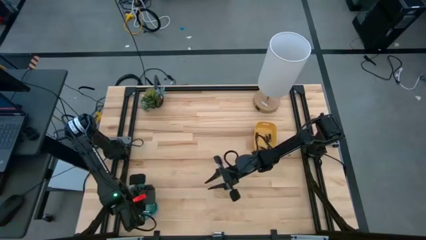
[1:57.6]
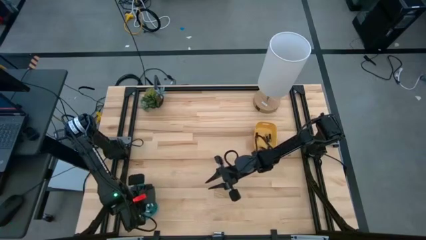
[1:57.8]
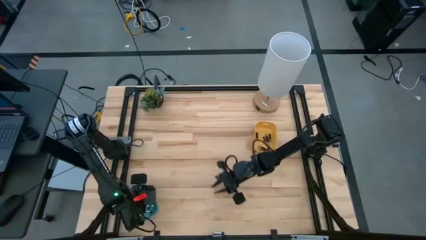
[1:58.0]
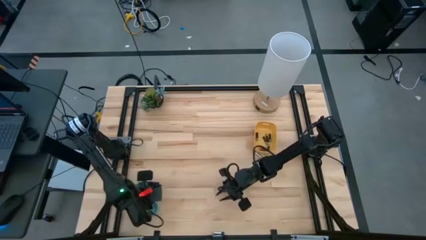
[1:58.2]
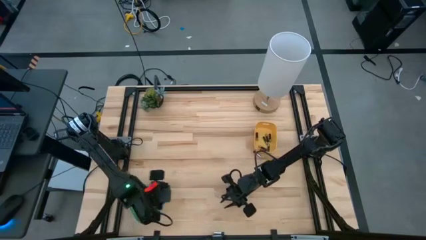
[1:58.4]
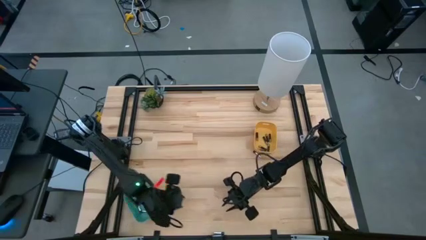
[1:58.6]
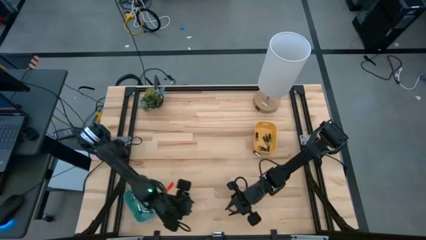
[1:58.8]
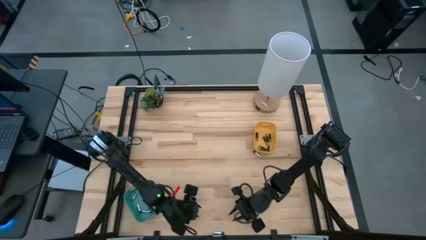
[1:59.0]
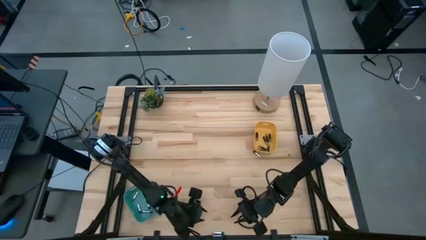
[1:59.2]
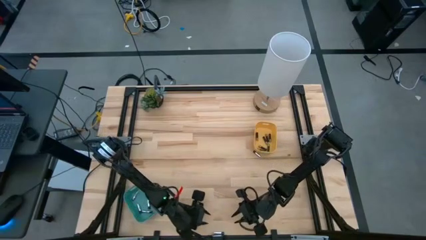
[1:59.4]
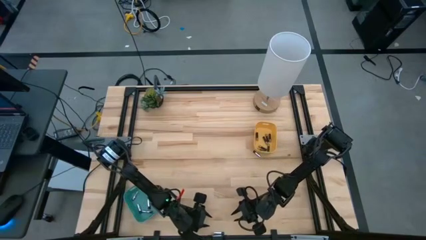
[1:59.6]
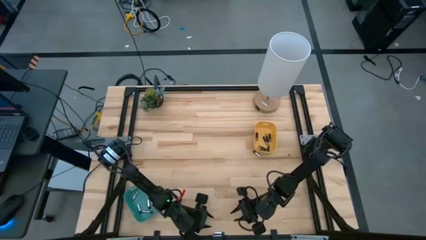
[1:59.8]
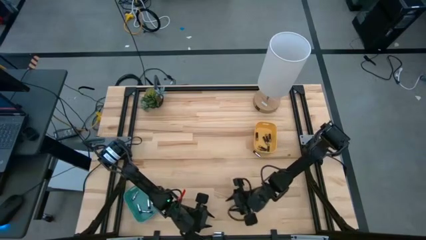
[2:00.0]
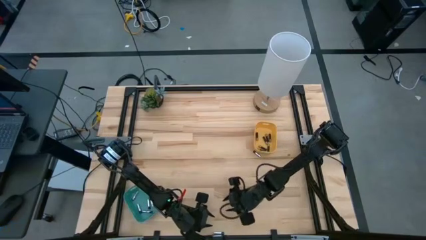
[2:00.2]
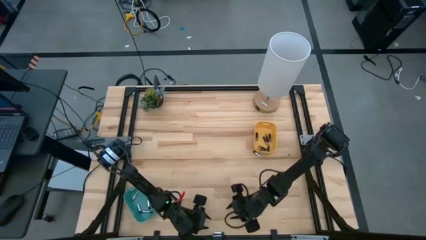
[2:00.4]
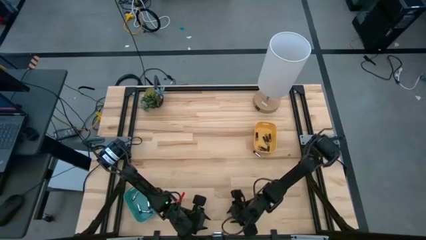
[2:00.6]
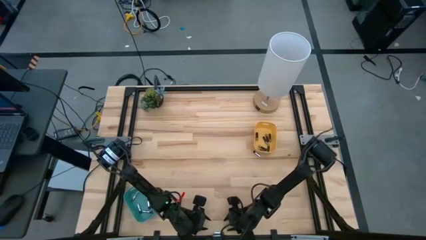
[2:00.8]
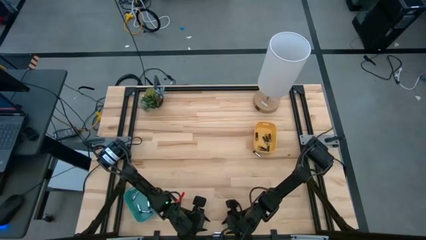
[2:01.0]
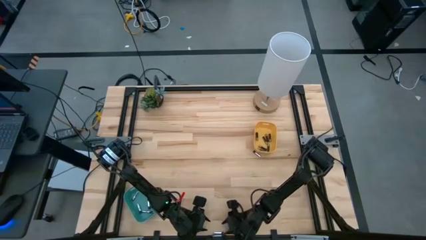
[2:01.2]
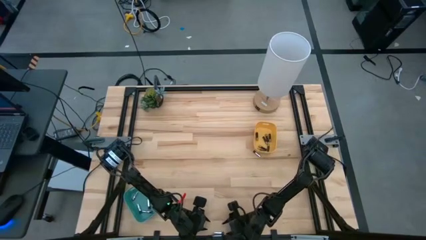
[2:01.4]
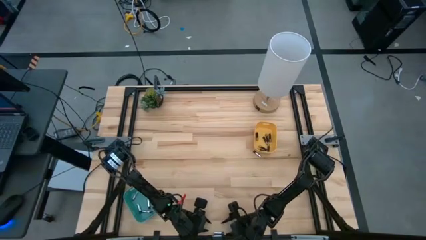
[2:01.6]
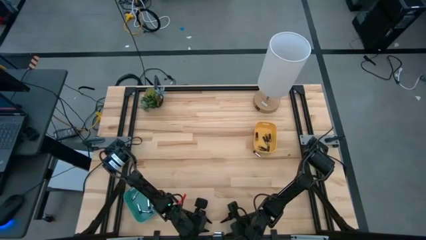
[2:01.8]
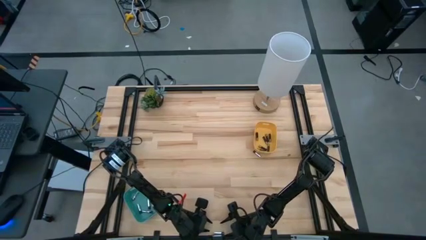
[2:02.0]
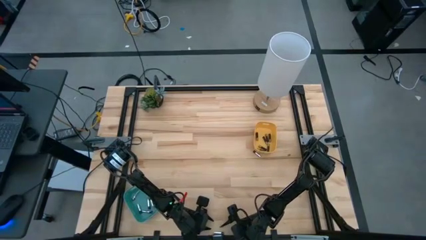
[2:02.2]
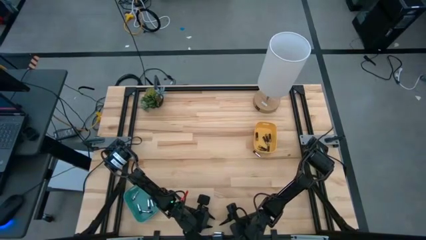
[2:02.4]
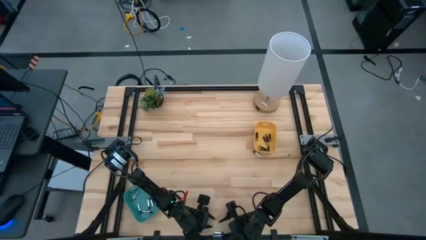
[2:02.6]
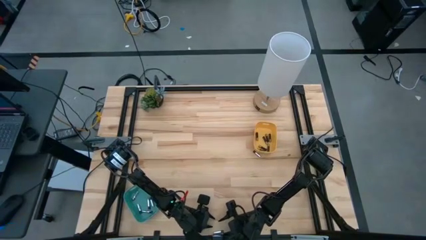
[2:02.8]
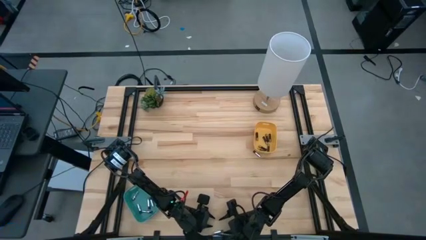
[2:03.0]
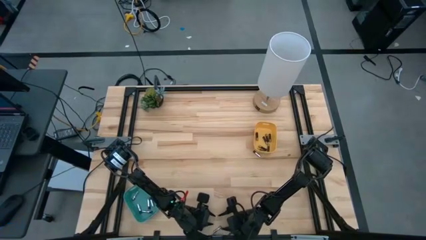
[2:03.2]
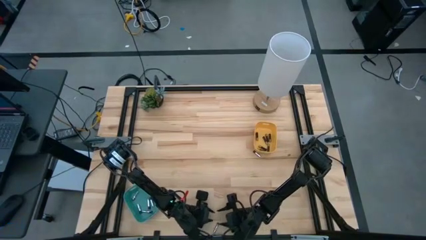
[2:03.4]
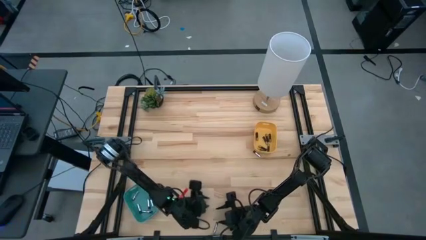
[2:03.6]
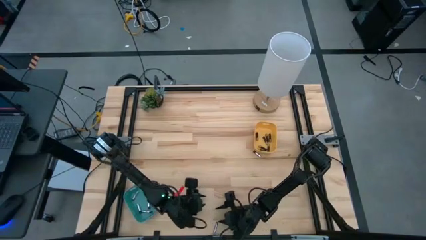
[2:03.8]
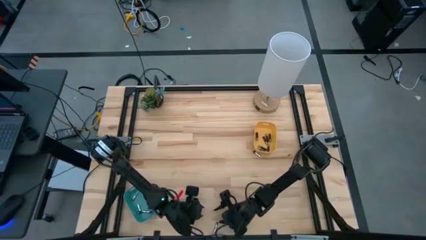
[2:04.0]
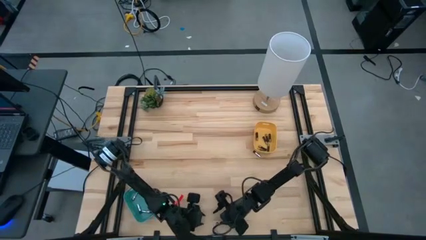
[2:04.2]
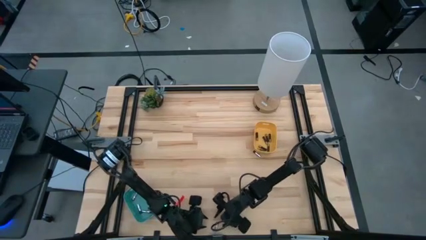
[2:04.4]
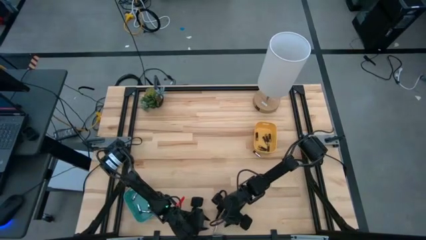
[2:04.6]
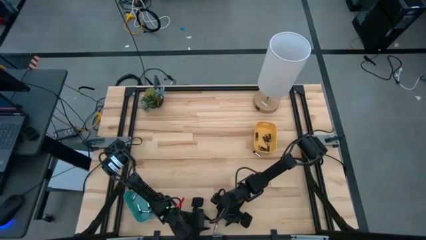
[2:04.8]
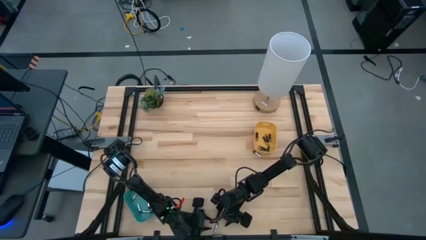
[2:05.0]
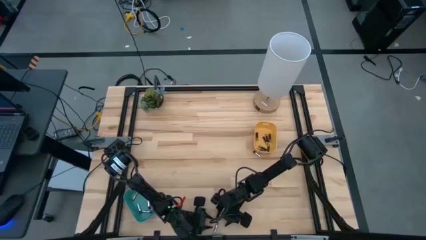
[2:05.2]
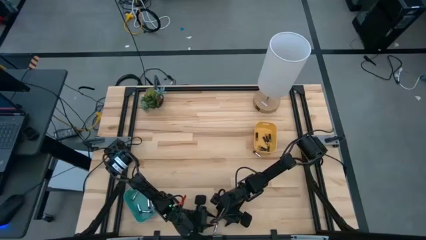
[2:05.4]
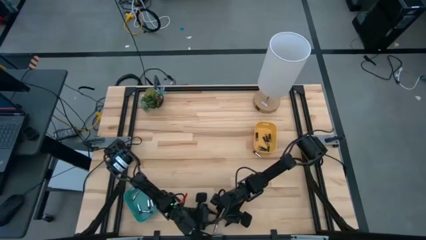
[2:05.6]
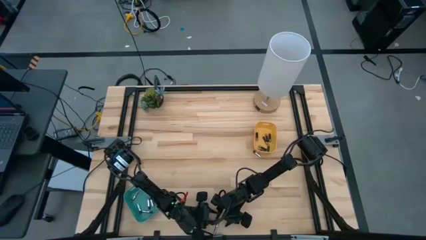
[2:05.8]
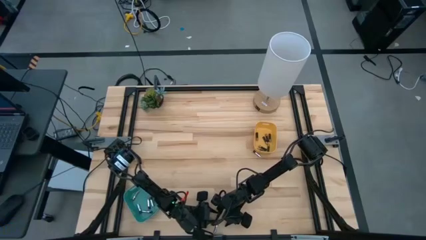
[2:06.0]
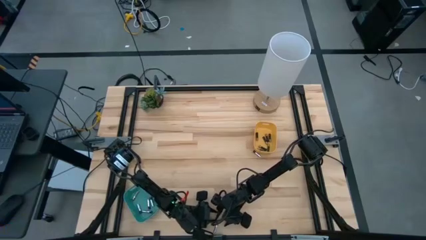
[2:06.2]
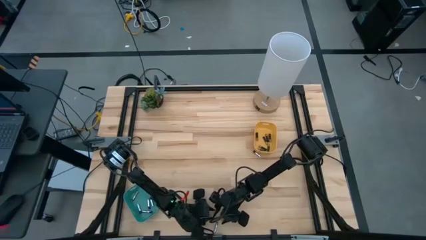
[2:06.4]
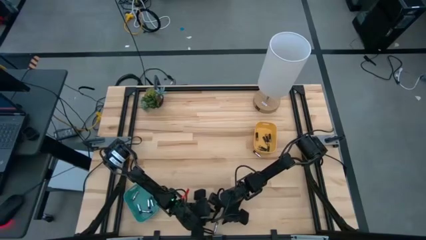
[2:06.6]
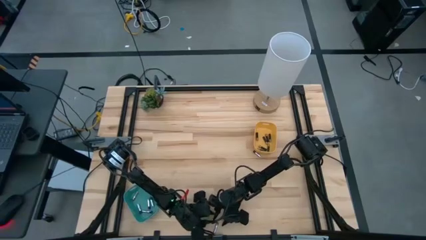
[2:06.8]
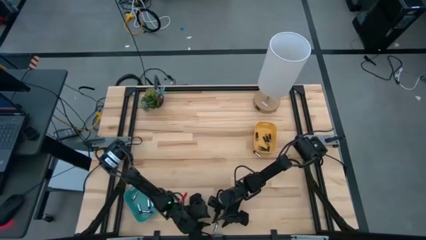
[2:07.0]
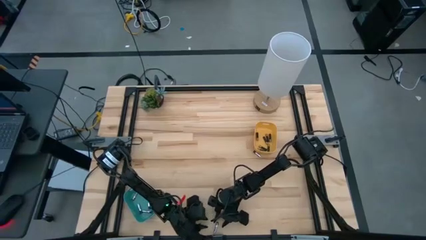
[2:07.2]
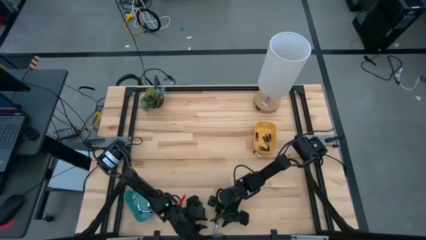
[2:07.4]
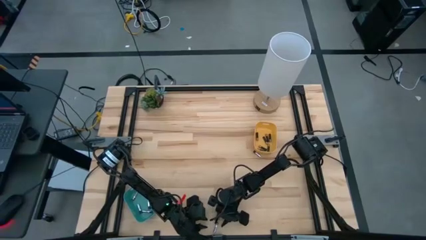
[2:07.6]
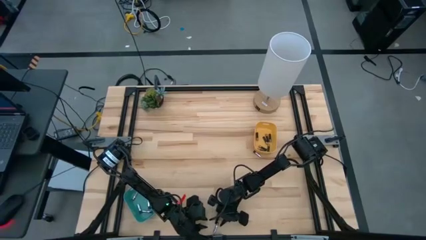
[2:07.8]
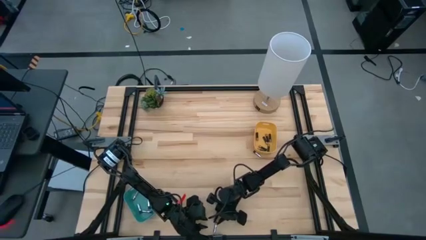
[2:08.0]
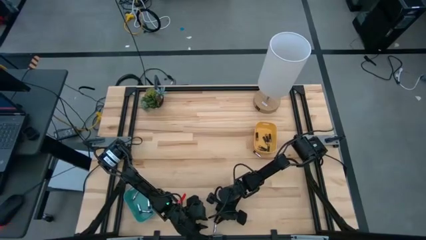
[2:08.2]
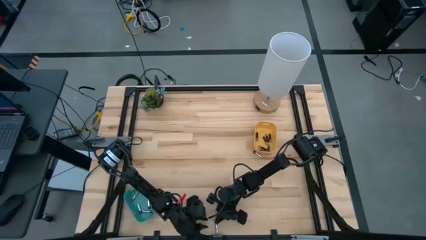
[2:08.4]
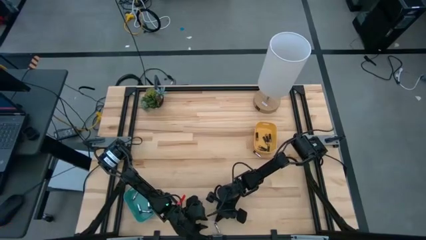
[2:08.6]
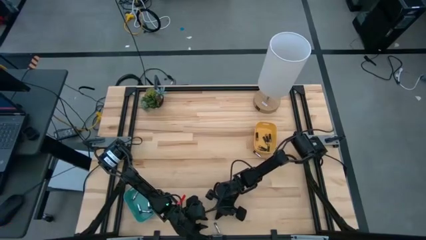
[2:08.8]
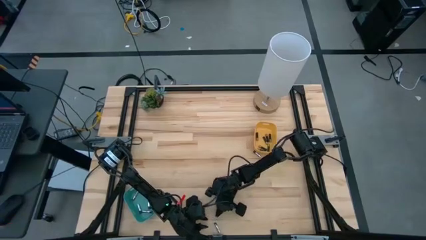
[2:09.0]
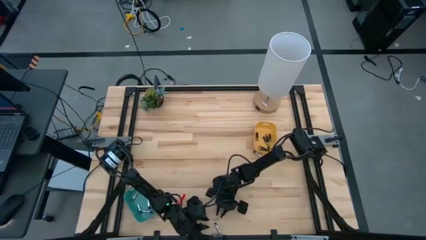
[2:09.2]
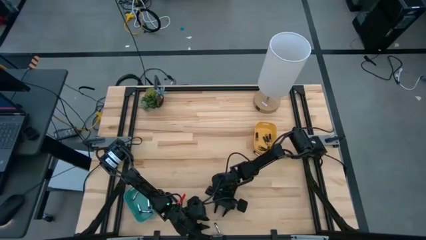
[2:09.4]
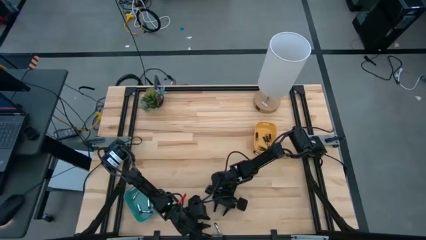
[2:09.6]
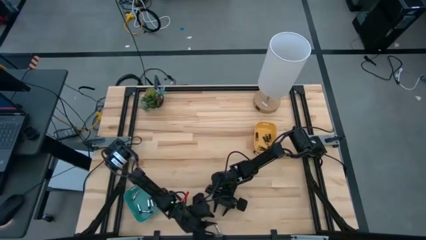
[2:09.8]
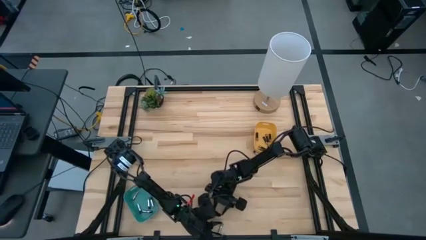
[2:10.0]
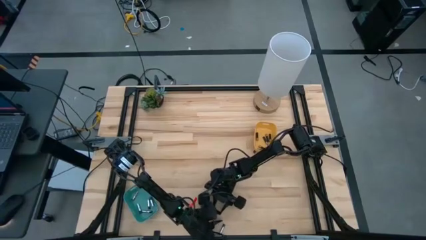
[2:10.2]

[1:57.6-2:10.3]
Task: Sort batteries
Put the silver battery into the blue bin
